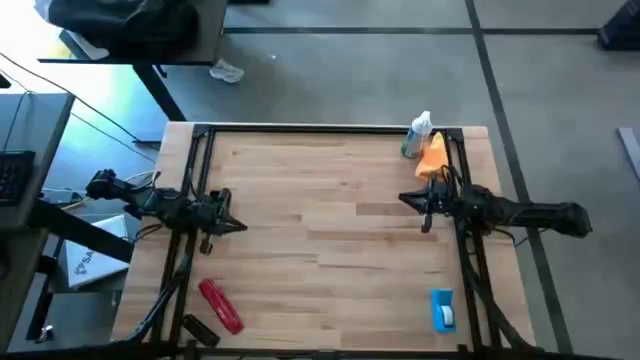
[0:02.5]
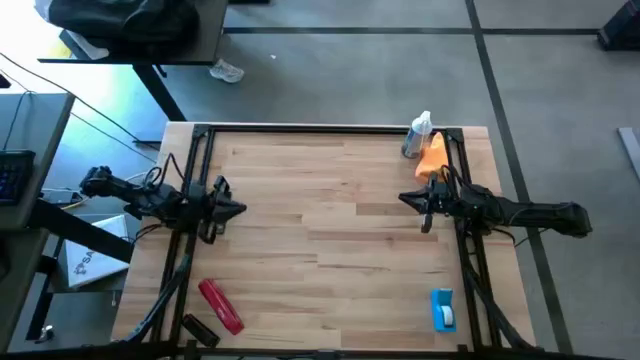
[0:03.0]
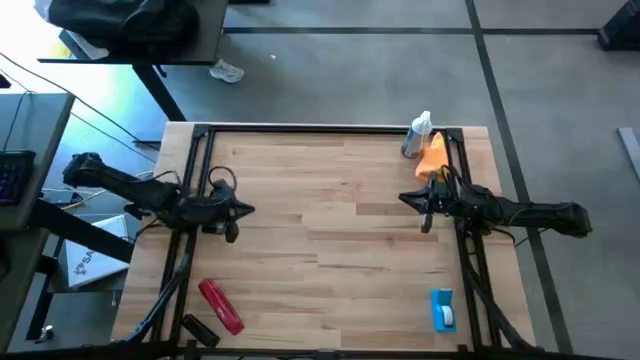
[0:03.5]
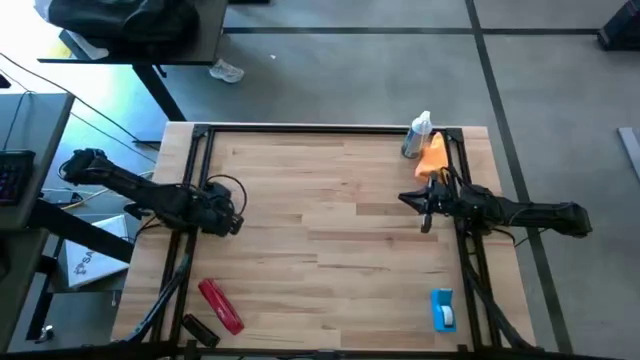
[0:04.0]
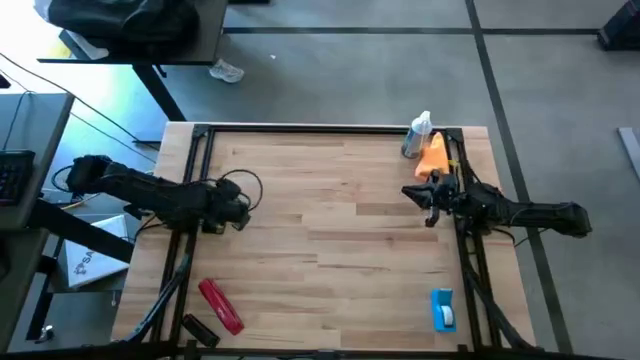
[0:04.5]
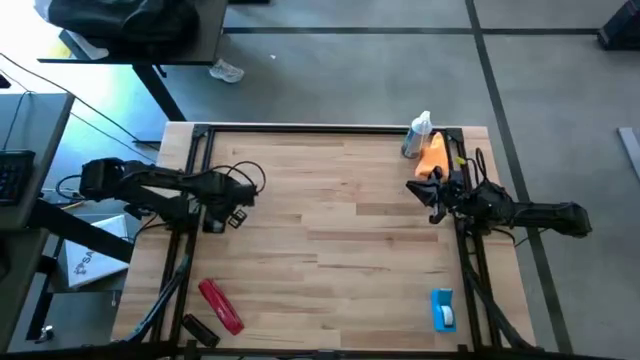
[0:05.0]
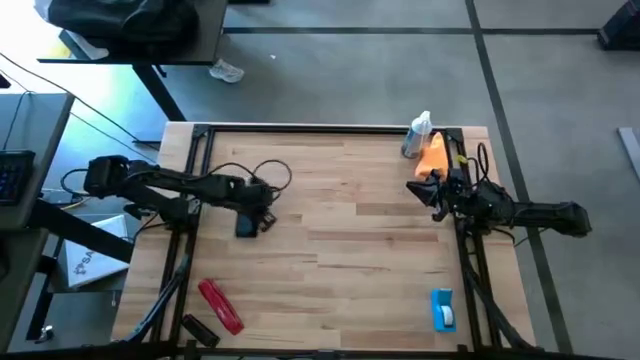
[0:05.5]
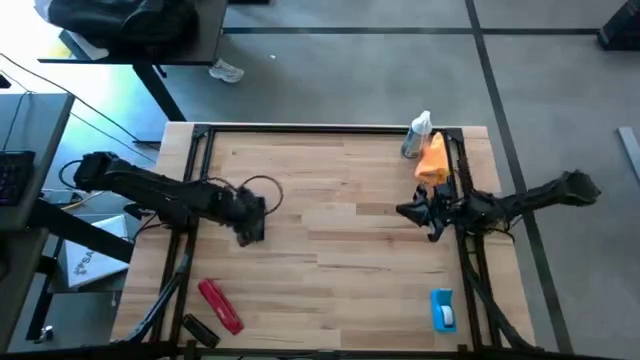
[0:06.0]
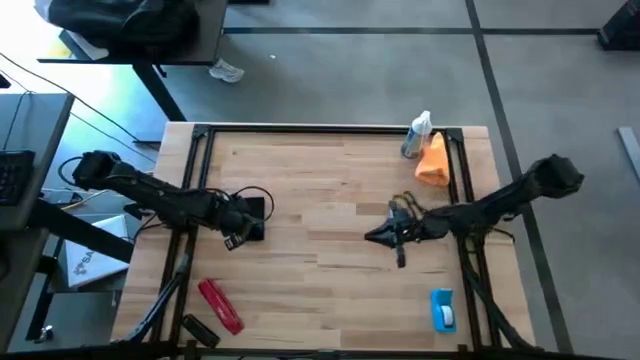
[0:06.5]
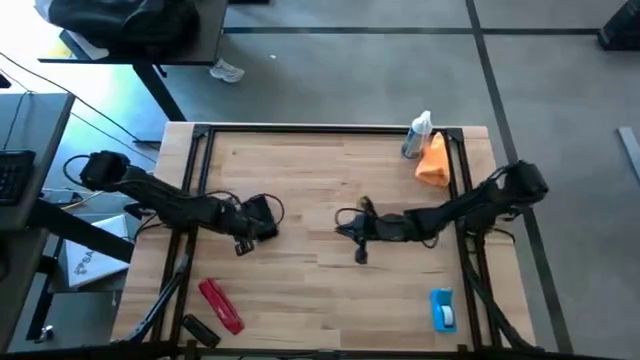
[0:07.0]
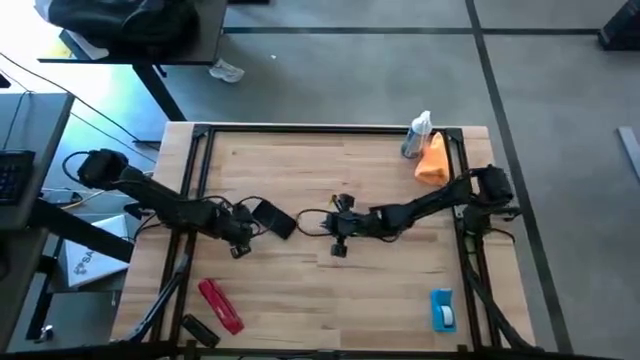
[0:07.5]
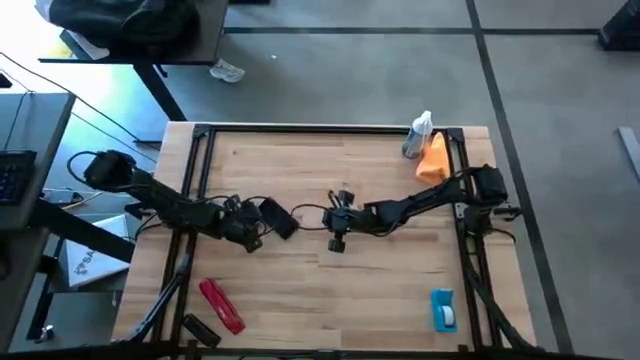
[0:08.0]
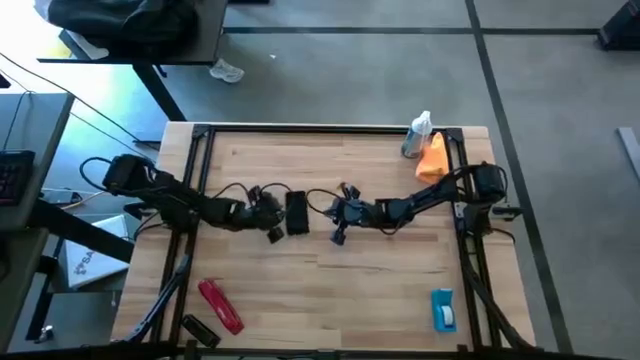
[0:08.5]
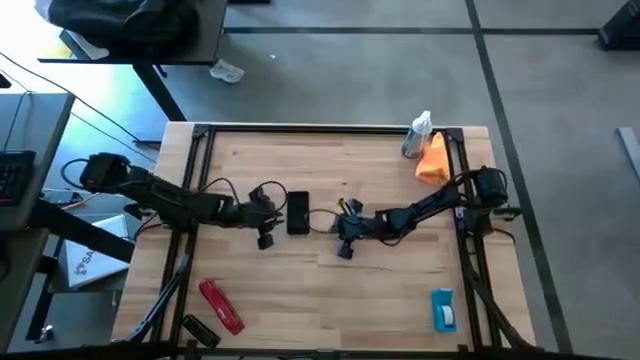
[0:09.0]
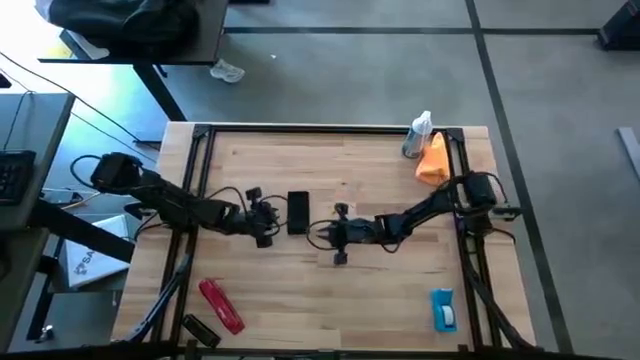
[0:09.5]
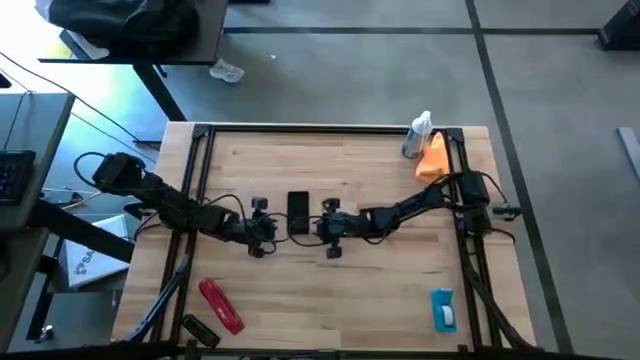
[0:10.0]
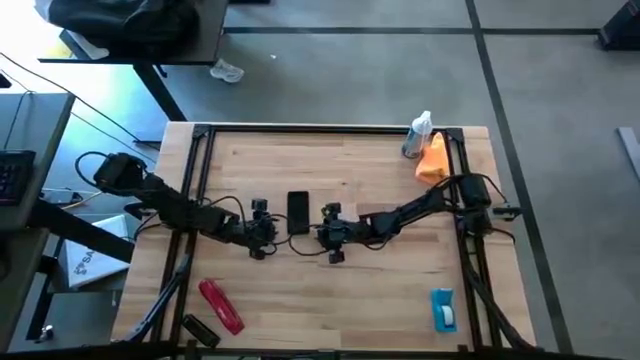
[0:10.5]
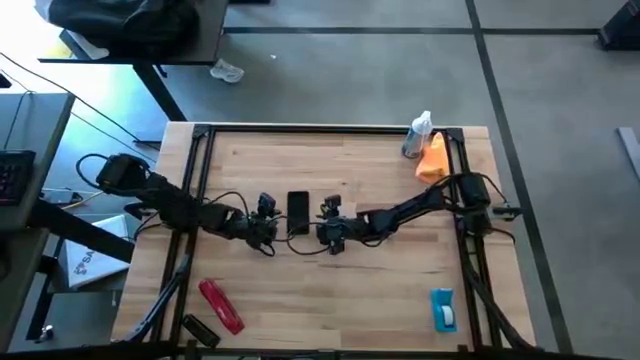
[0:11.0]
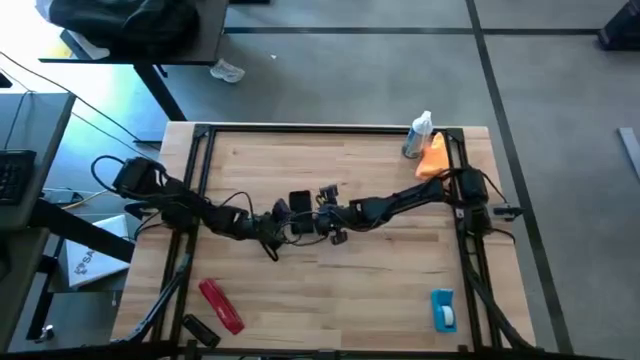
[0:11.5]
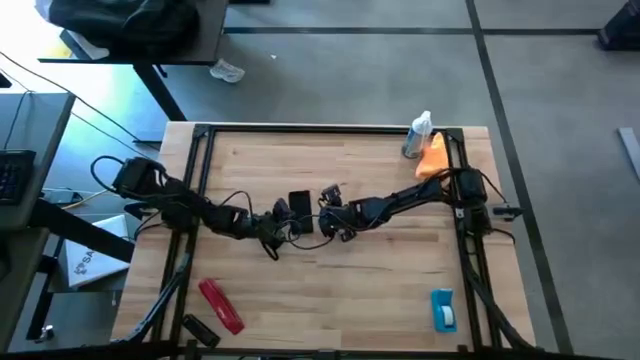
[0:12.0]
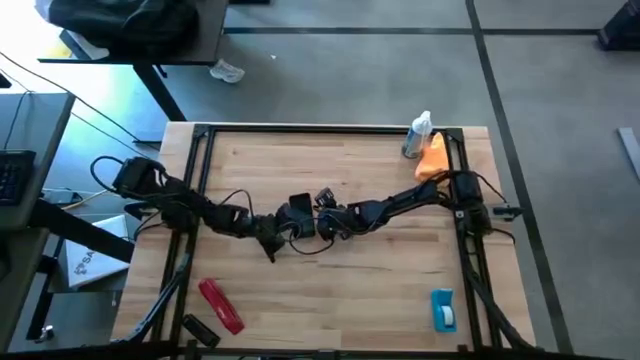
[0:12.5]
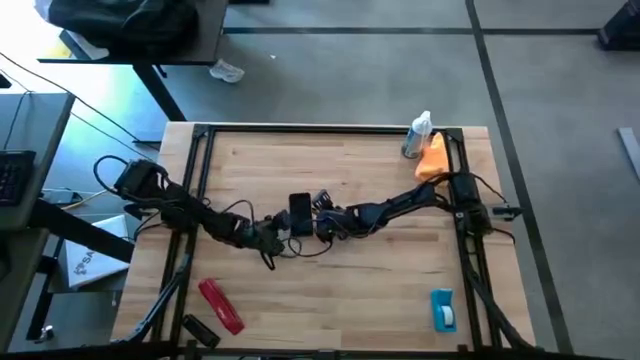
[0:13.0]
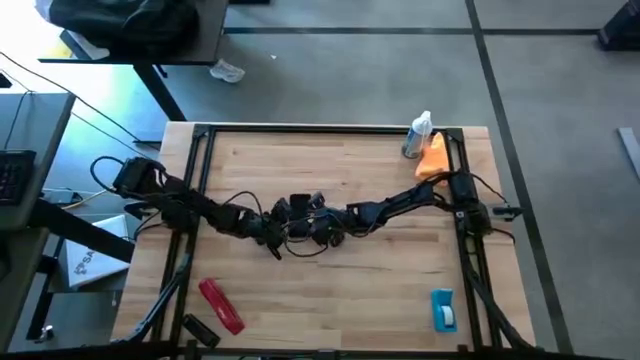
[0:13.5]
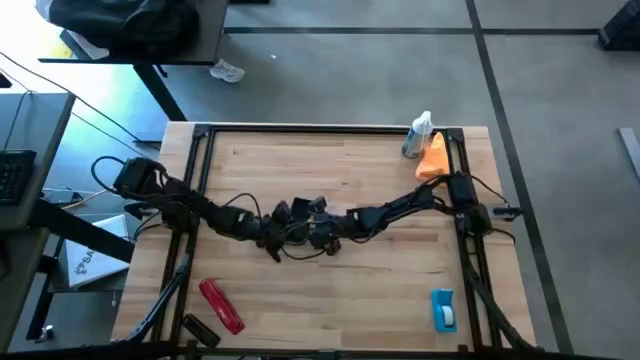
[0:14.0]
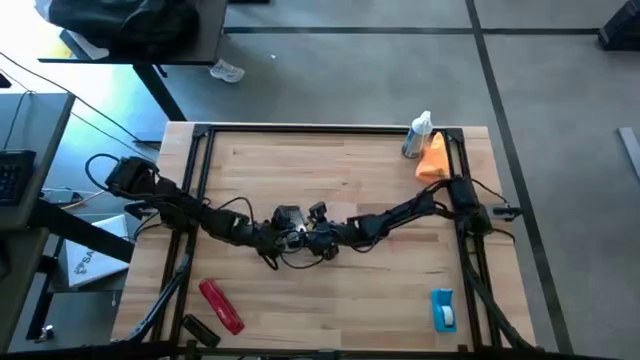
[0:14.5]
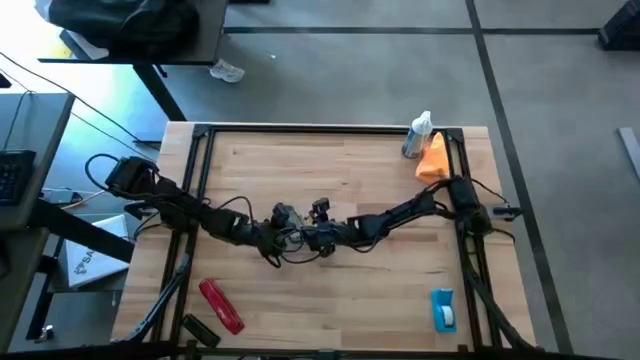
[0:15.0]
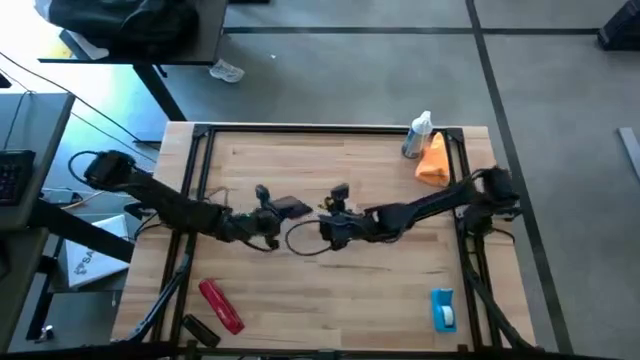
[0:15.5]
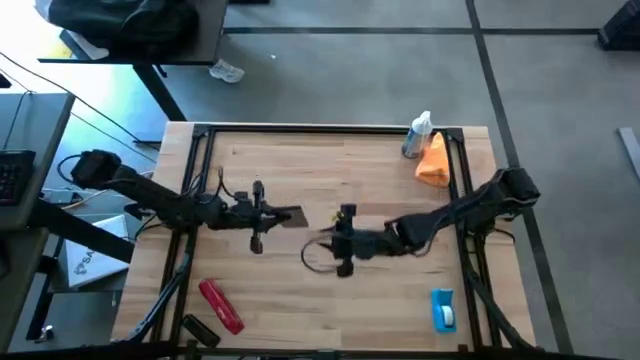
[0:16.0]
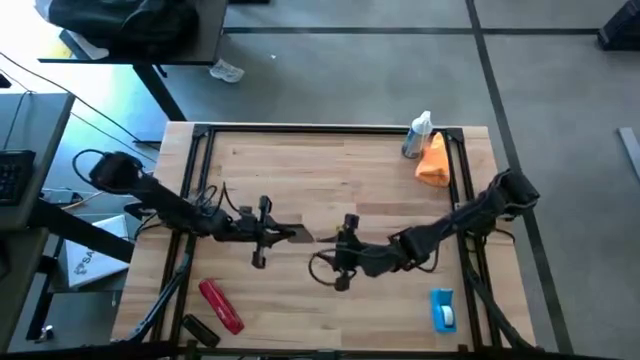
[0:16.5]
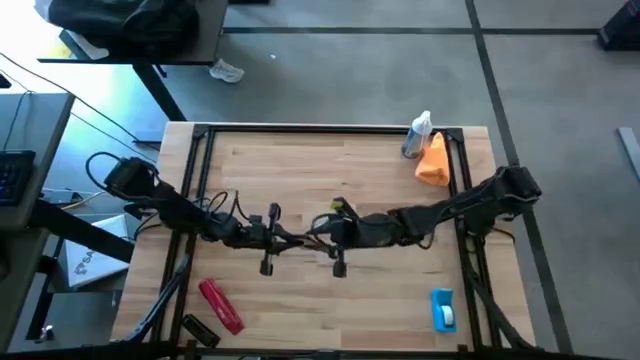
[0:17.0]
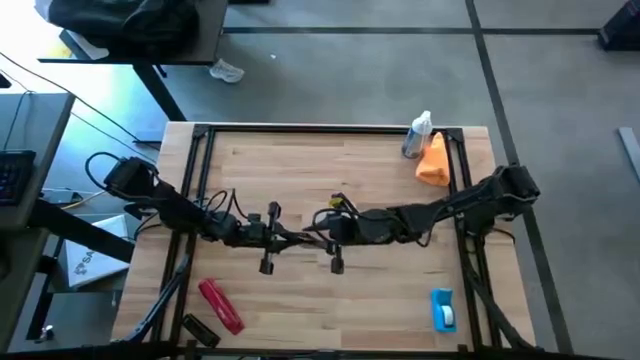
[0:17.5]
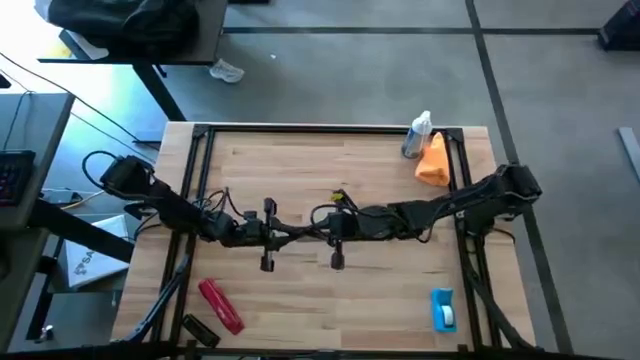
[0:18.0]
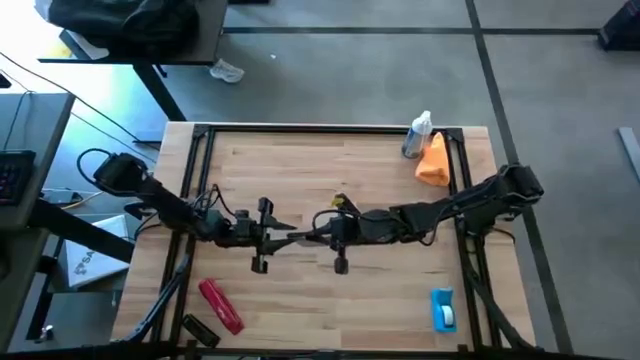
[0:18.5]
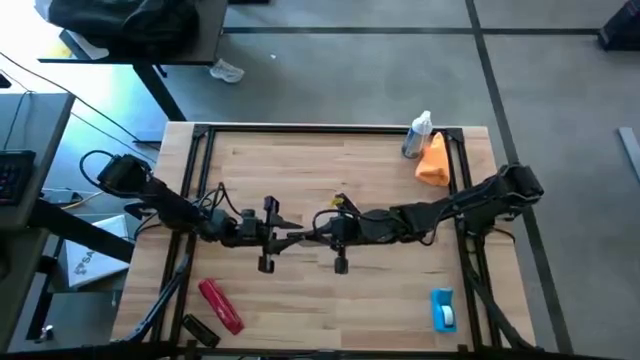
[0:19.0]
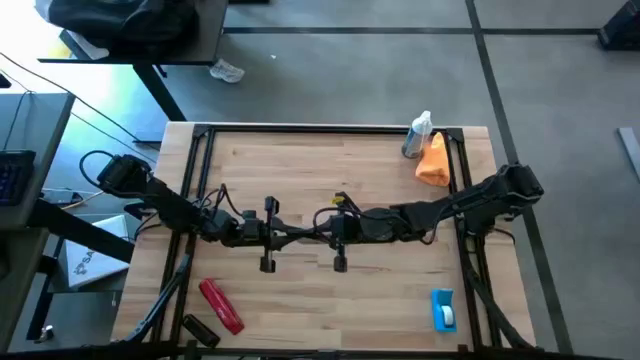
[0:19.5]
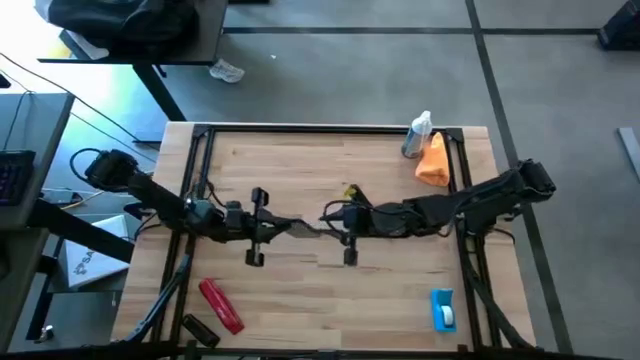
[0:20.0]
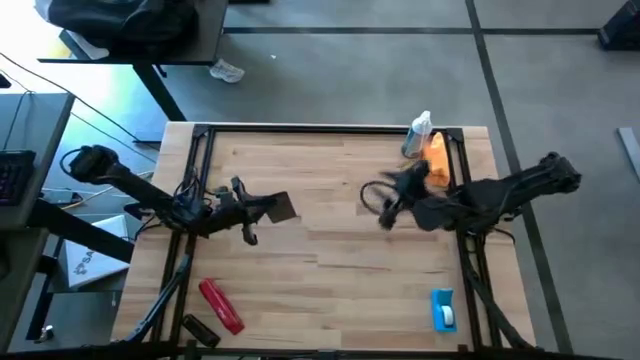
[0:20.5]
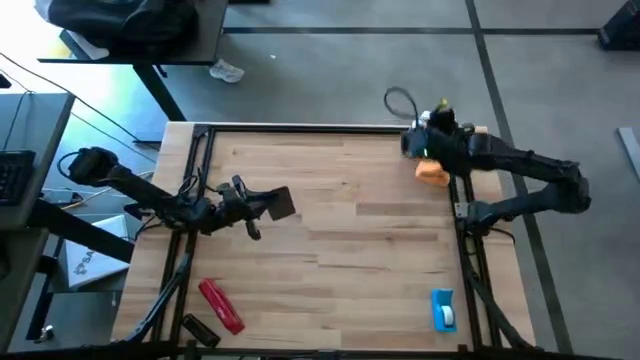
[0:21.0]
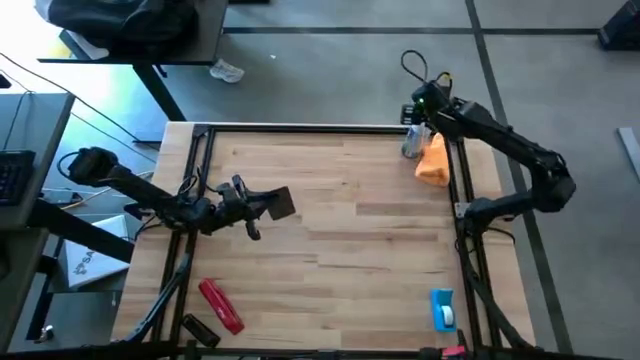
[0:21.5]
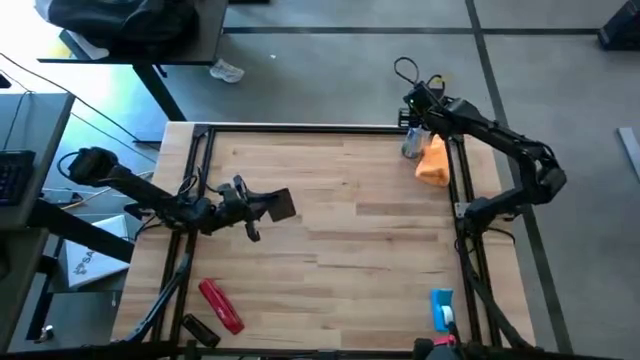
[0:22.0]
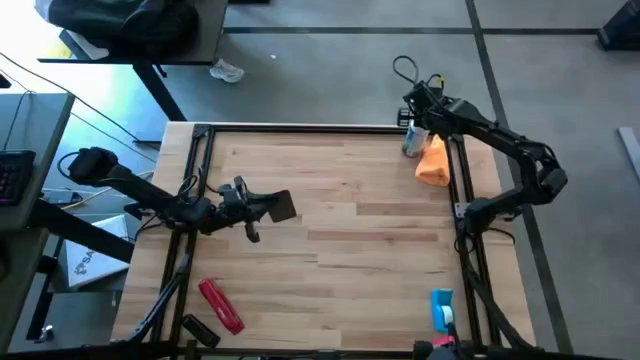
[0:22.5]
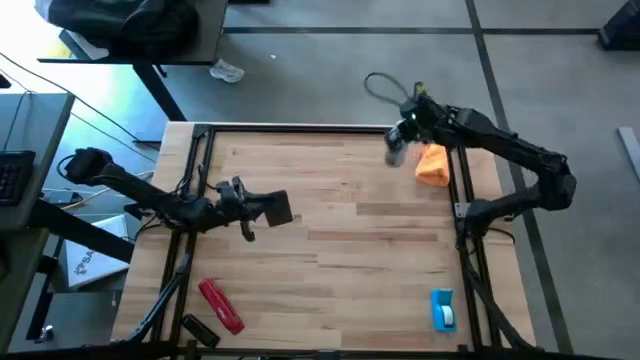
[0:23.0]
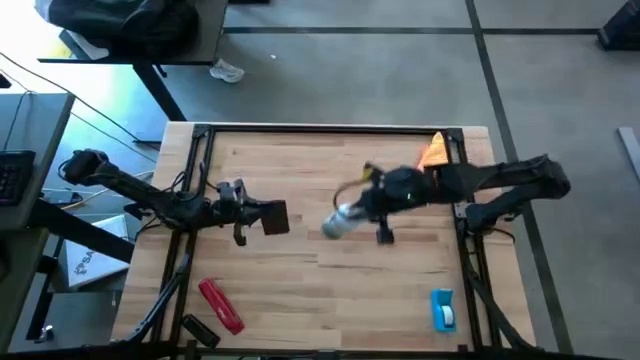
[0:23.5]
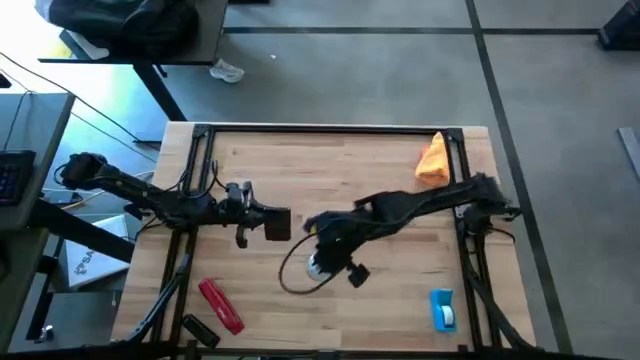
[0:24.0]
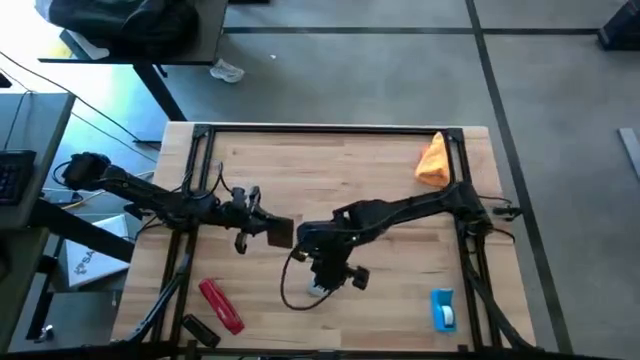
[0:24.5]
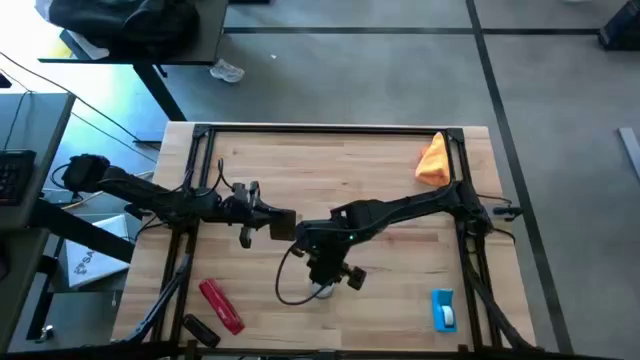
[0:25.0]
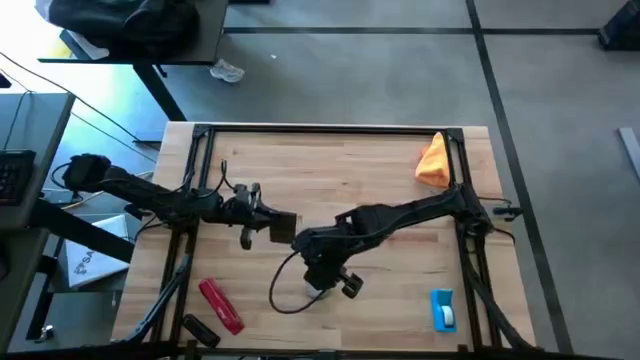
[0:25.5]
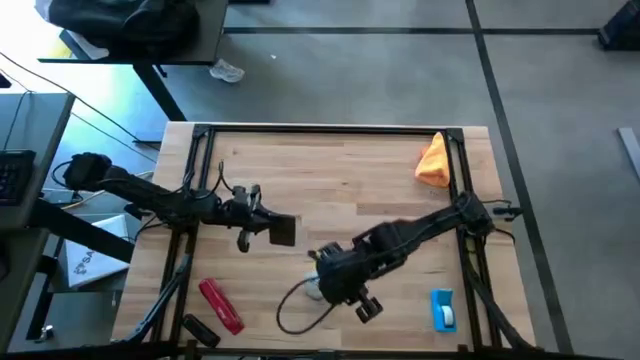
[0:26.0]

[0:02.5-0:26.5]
Task: Apply microfiber cloth
Spray the front and back of the cellphone using a spray bottle
